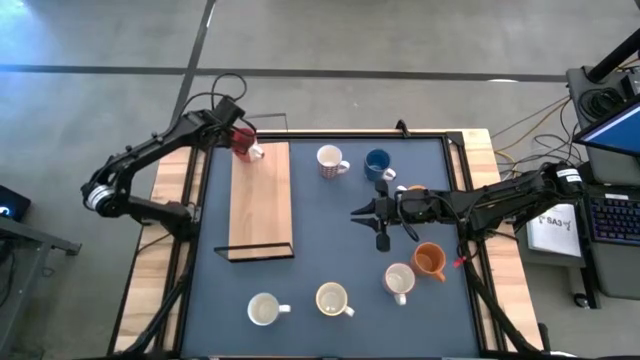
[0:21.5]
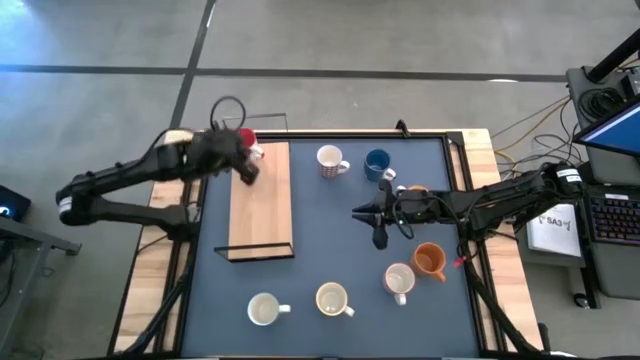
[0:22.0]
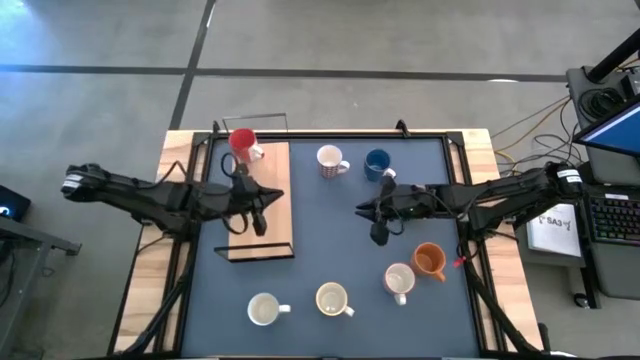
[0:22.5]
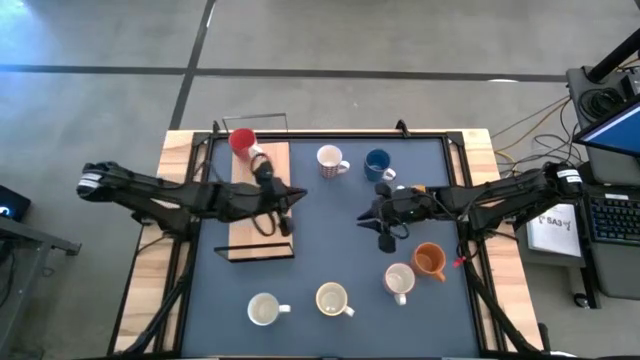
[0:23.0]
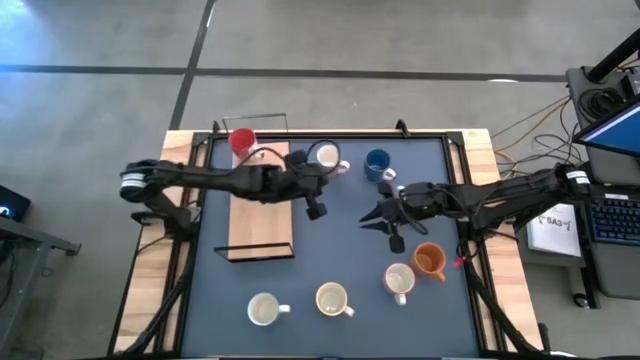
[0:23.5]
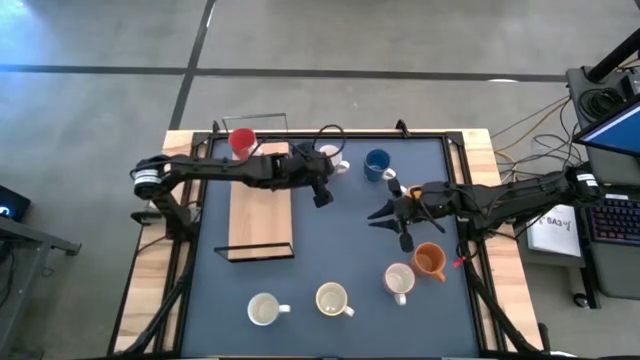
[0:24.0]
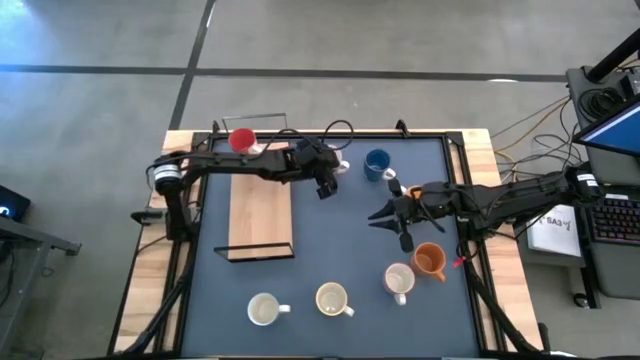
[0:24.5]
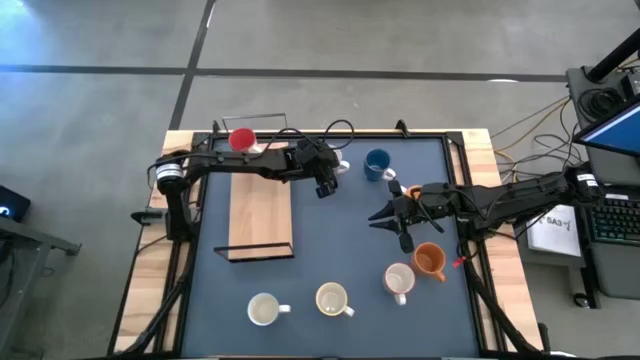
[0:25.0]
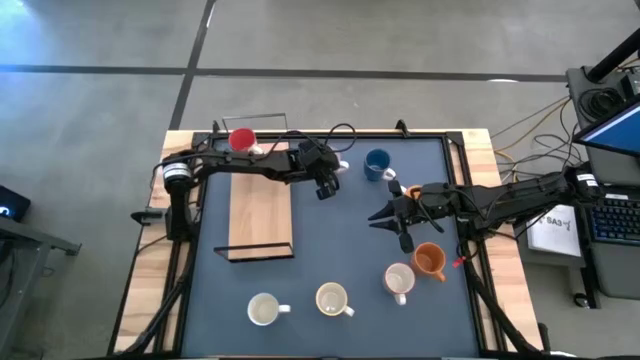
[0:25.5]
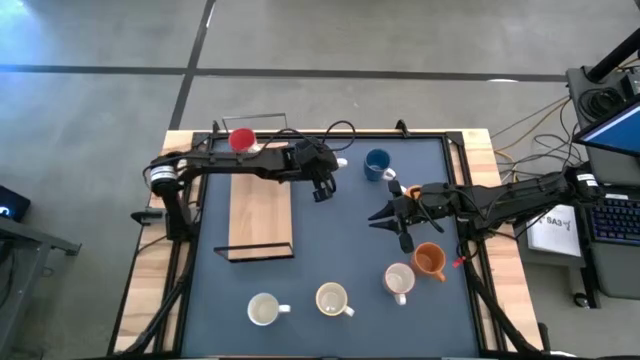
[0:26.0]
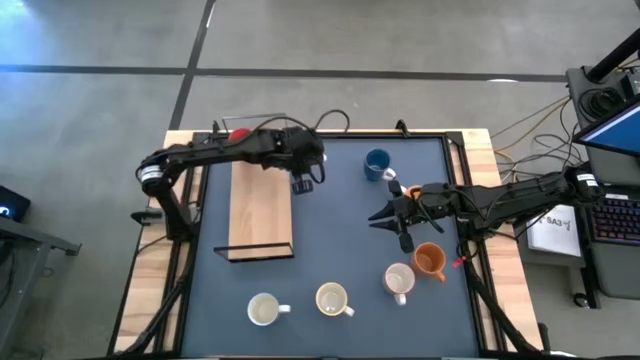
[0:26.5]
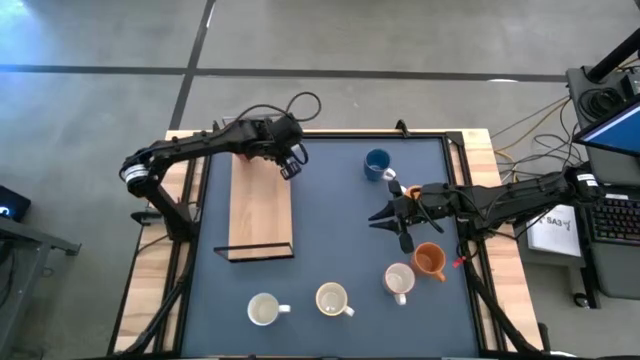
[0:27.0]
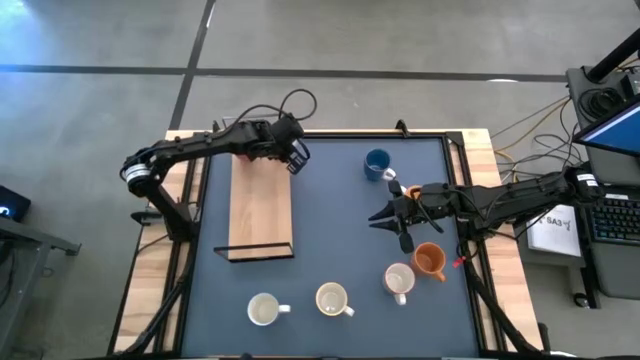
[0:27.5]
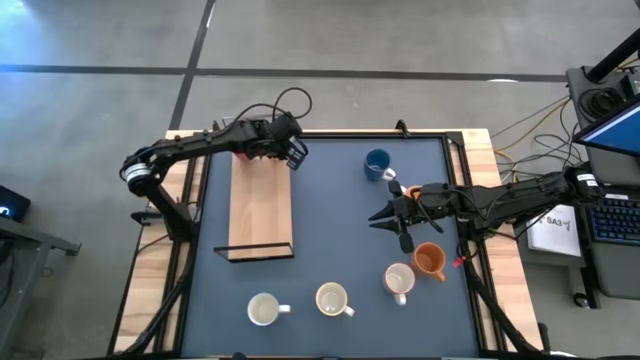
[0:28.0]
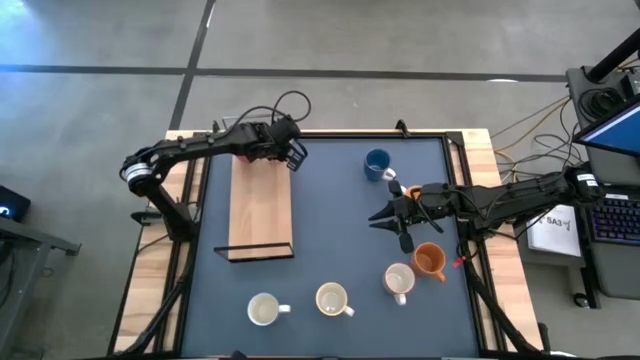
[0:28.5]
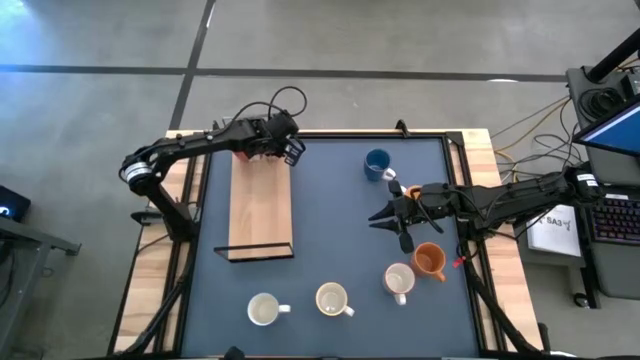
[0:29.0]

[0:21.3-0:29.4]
Task: Place coffee mugs
Put the red patterned mug on the shelf

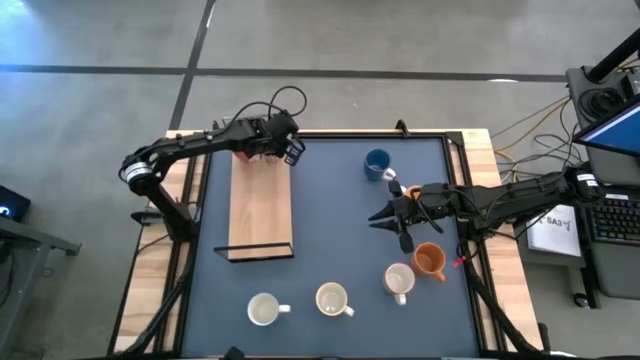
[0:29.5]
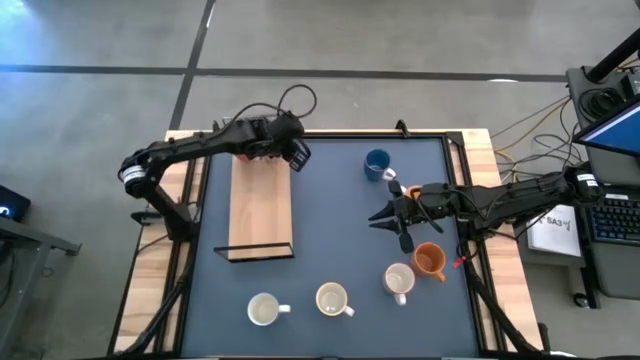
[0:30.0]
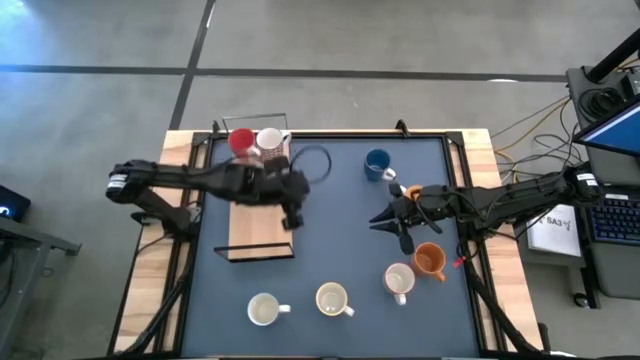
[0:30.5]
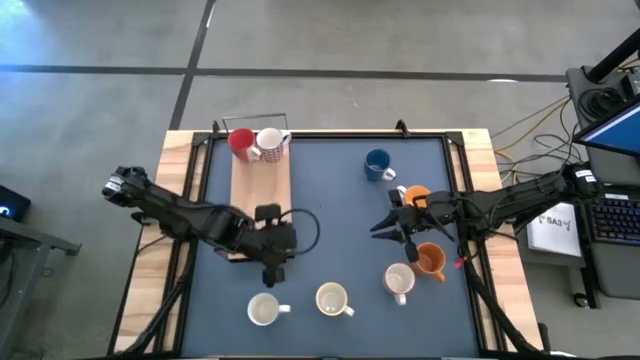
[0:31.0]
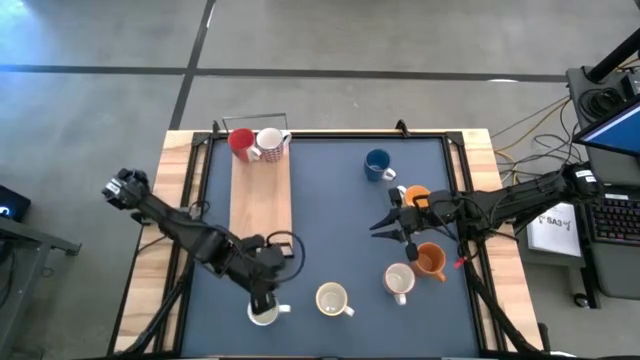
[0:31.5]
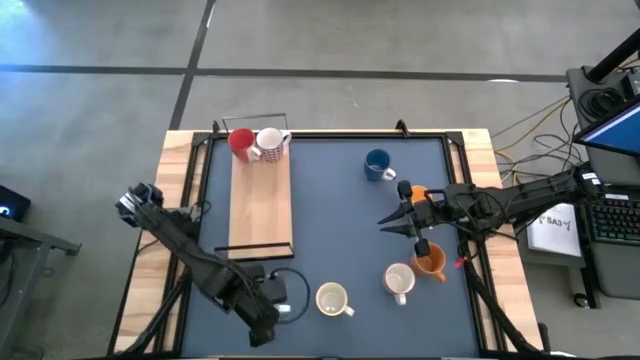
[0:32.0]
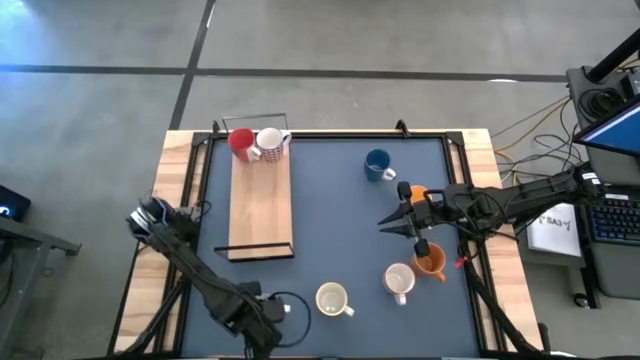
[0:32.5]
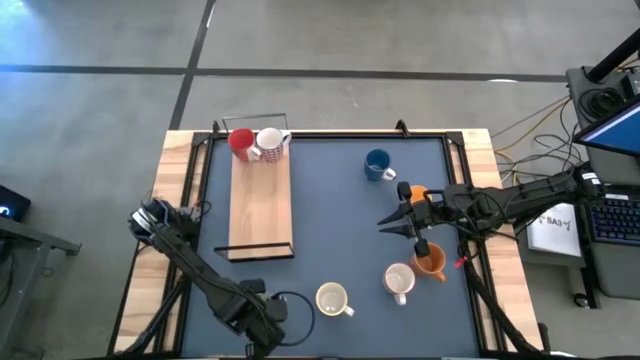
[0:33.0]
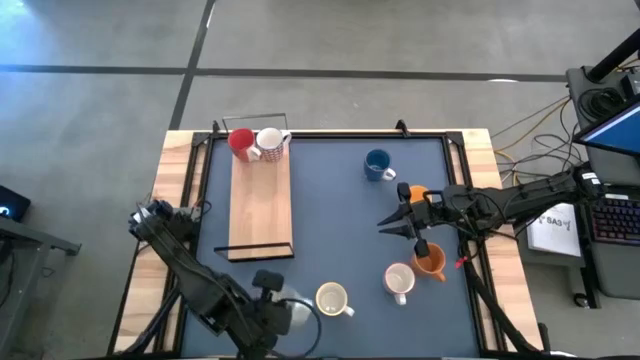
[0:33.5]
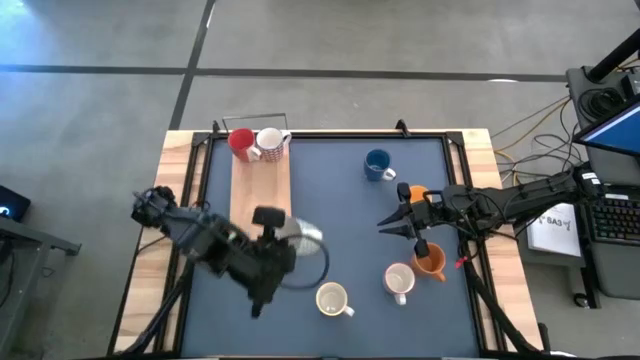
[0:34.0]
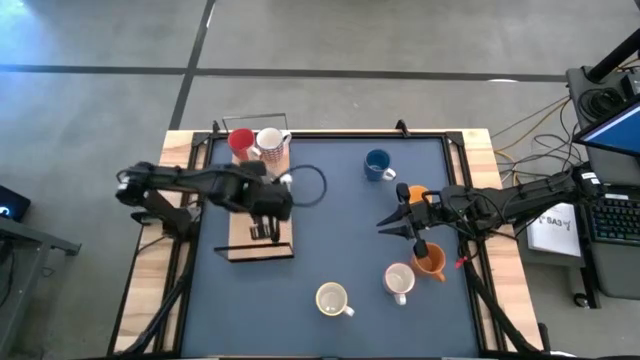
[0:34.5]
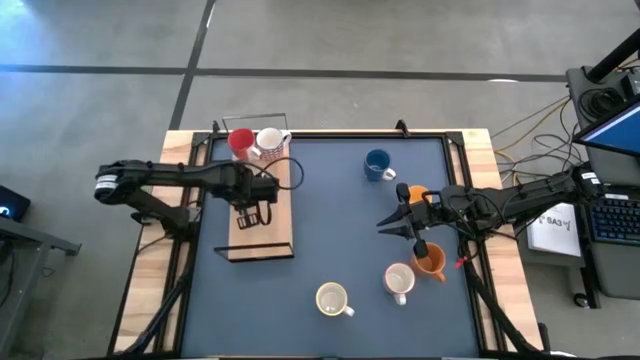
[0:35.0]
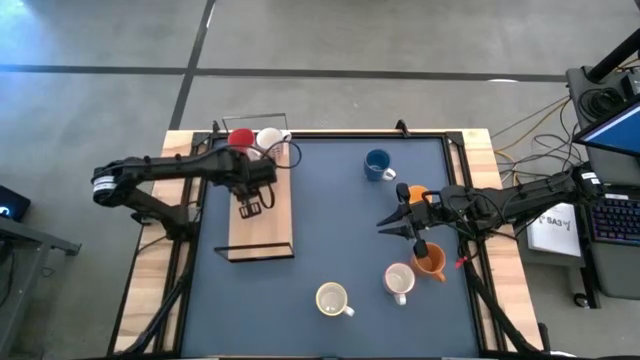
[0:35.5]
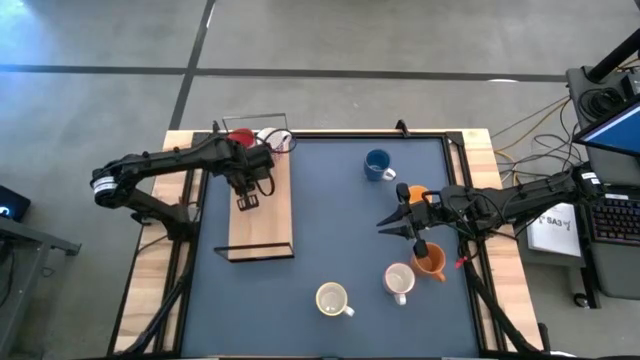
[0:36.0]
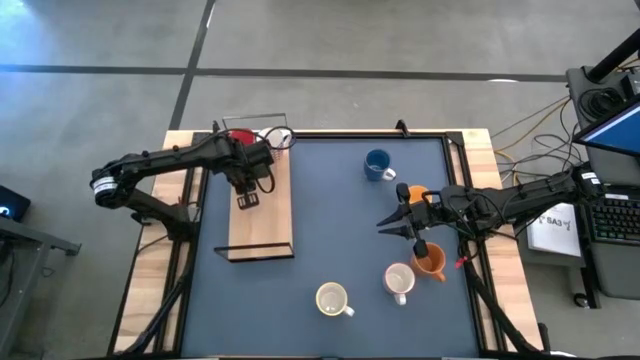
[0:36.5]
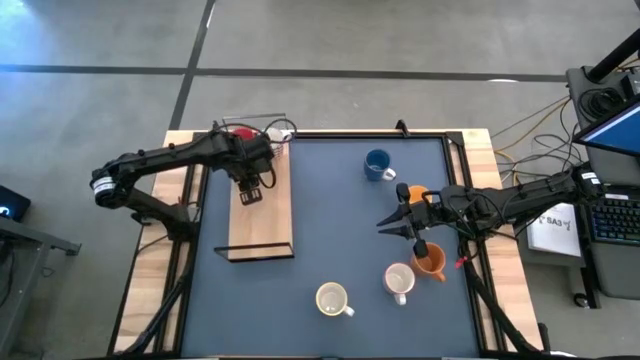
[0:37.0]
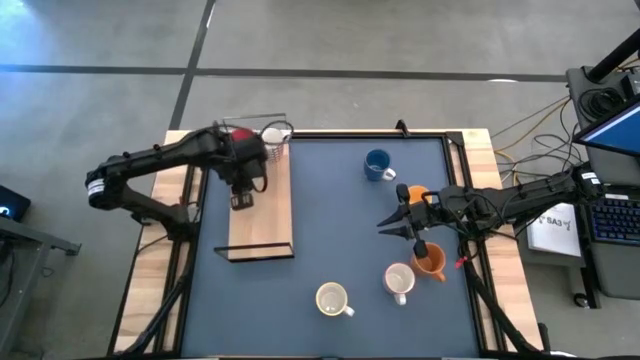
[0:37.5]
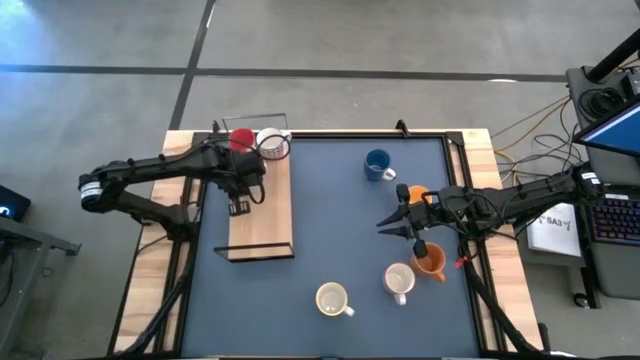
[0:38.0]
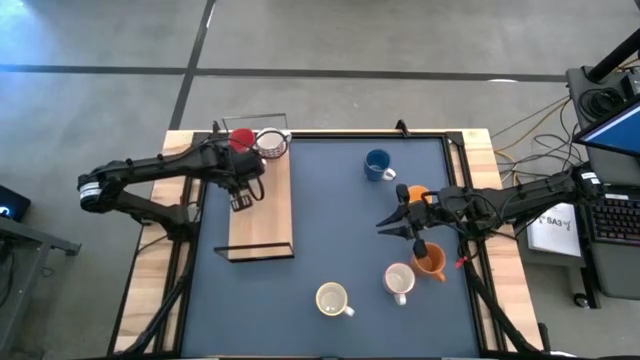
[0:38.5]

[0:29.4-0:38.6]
Put the green patterned mug on the shelf

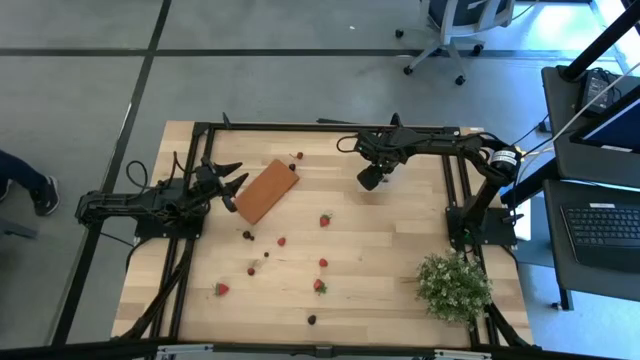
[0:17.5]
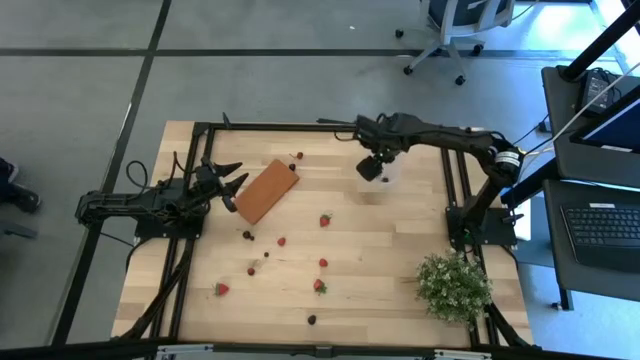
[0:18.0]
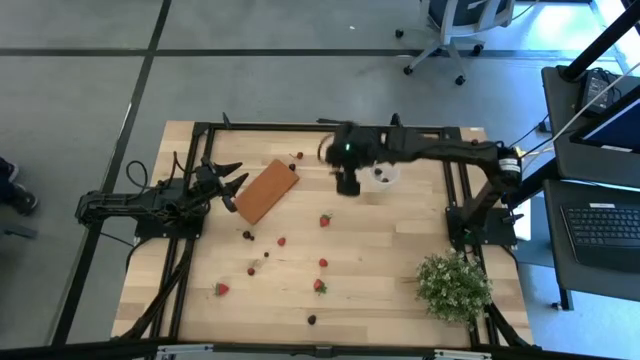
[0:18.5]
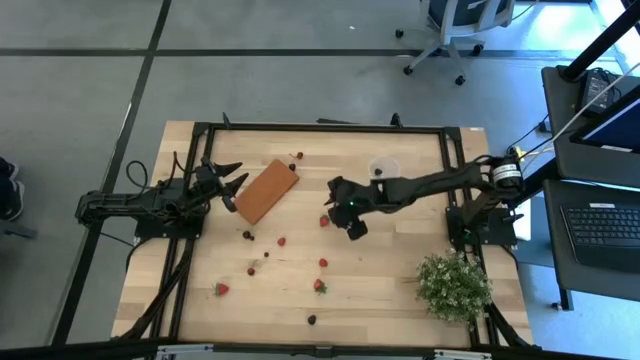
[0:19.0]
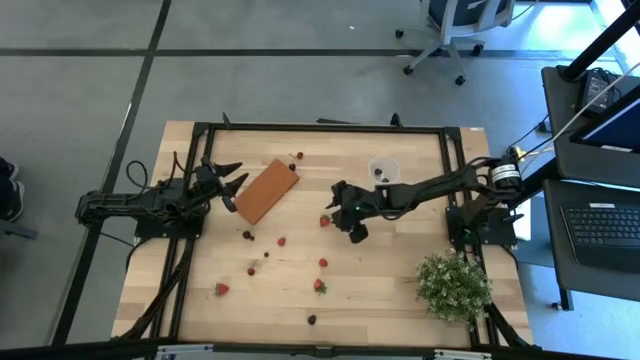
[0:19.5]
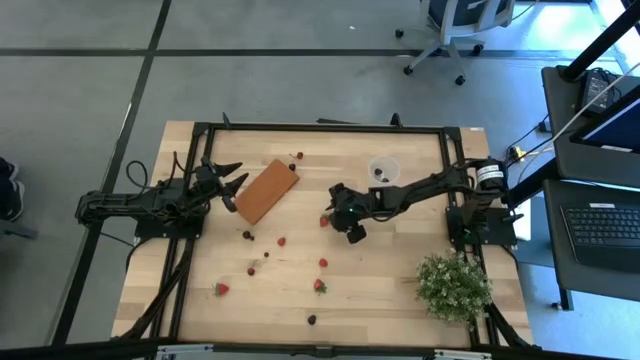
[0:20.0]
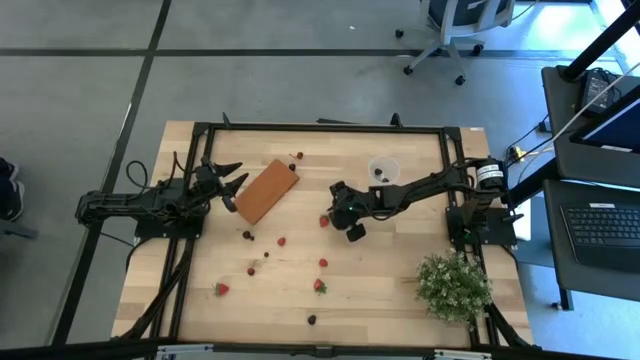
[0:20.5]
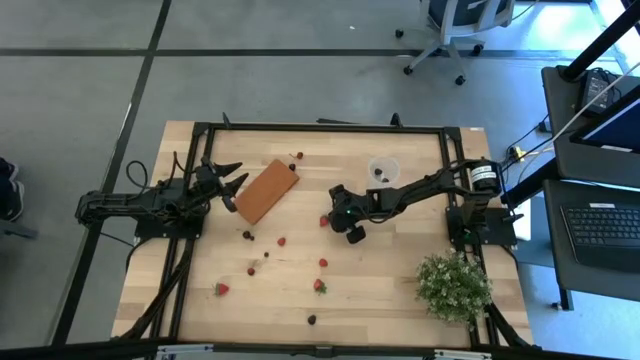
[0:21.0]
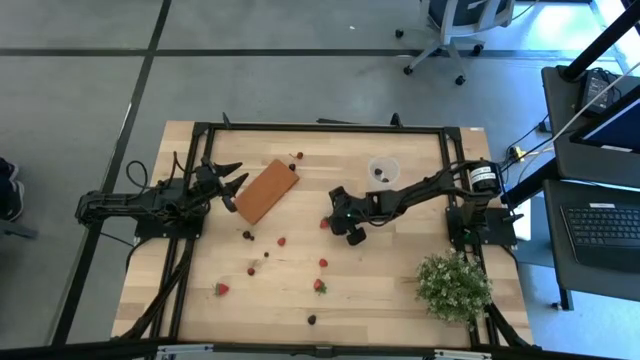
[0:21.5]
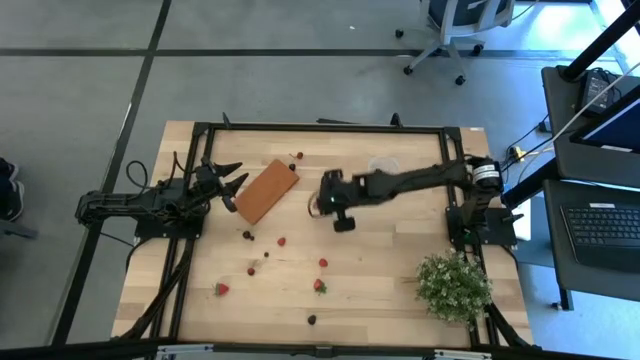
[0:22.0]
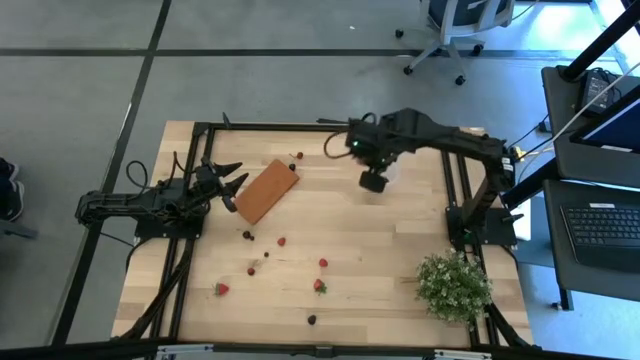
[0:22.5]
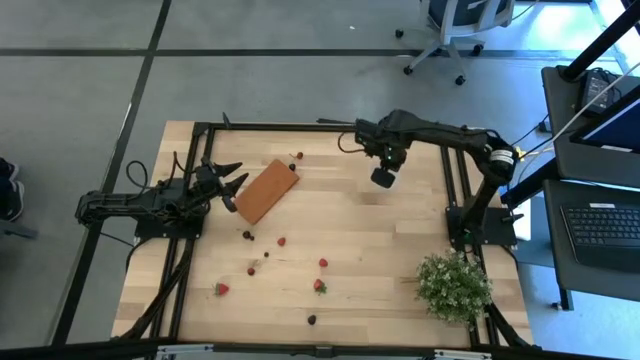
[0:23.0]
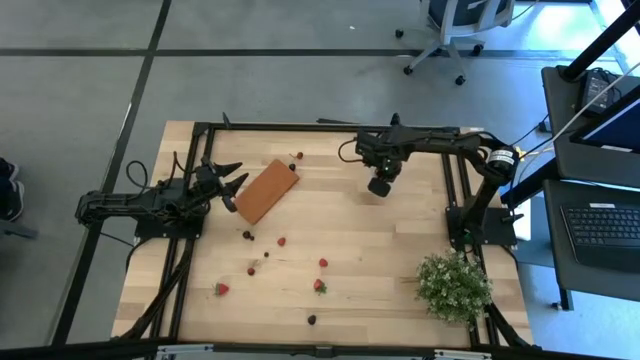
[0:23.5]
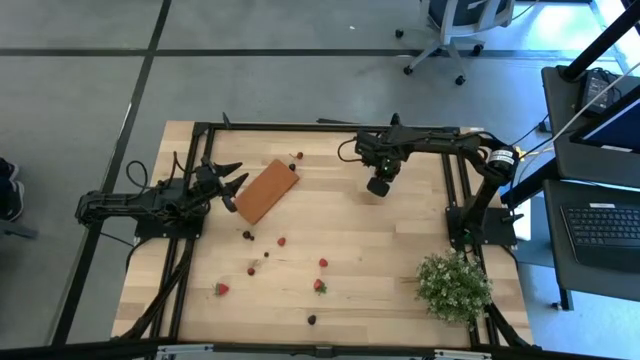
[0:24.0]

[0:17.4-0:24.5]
Task: Pick and placing Produce into tupperware
Put the top red strawberry into the transparent container
